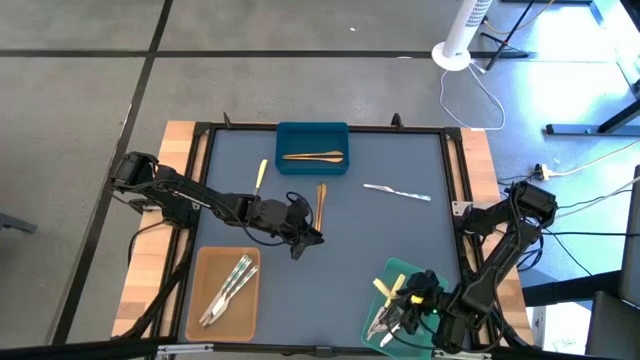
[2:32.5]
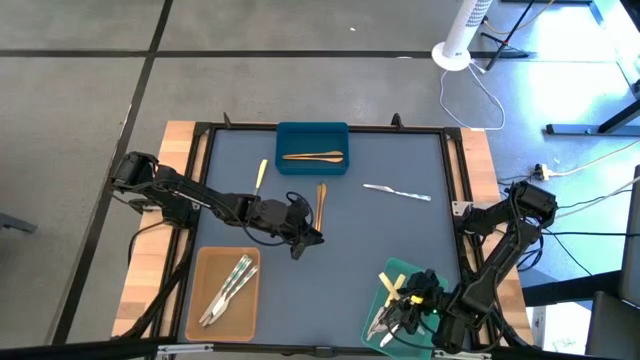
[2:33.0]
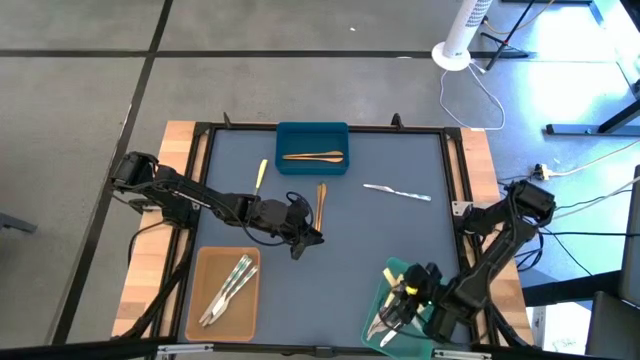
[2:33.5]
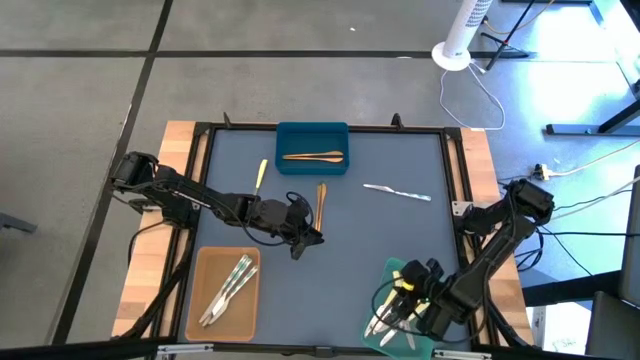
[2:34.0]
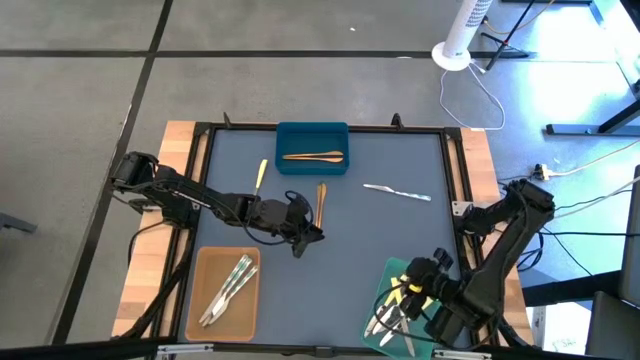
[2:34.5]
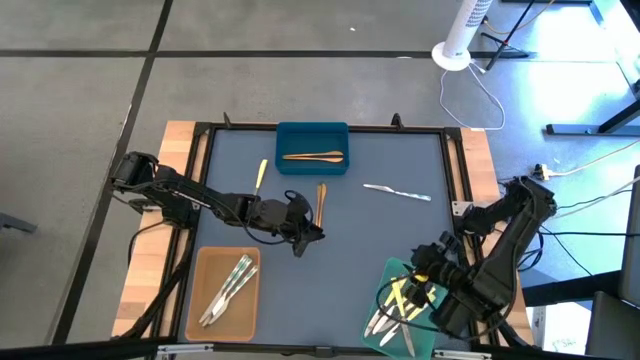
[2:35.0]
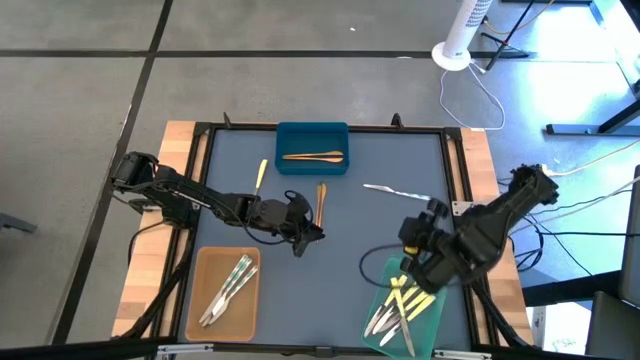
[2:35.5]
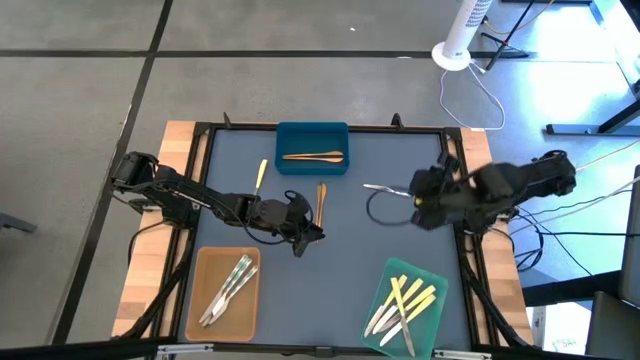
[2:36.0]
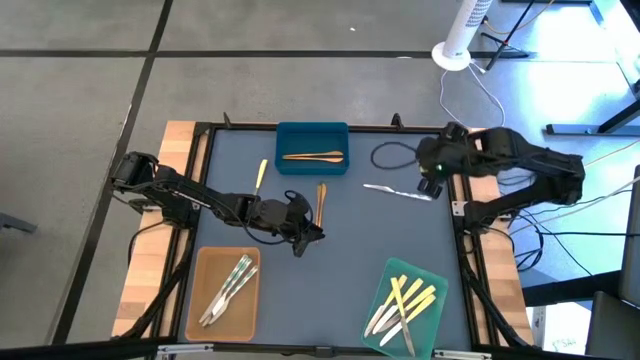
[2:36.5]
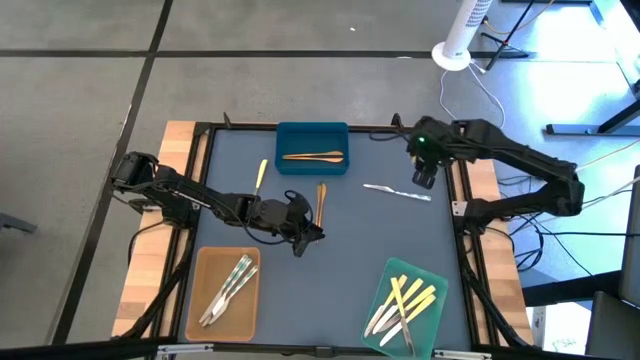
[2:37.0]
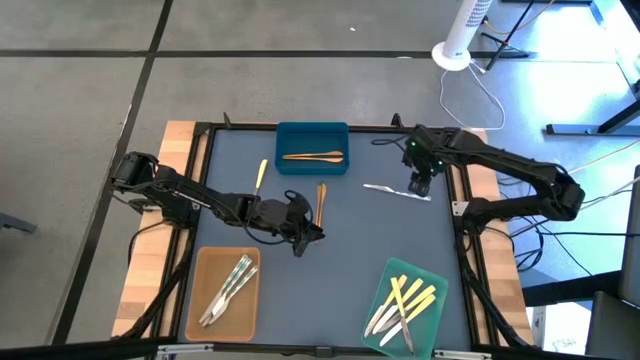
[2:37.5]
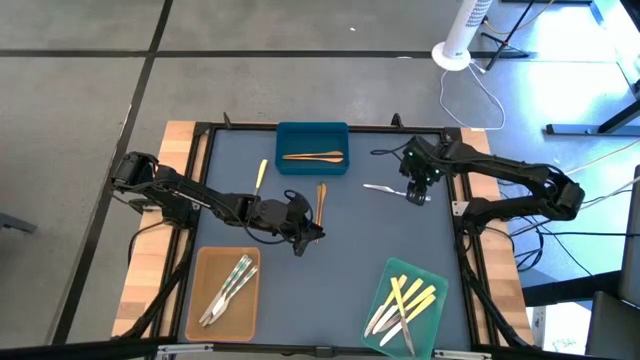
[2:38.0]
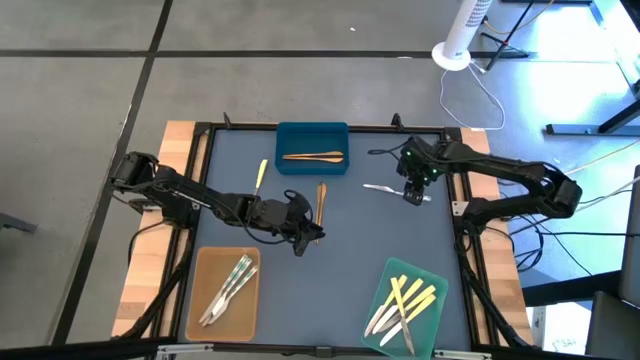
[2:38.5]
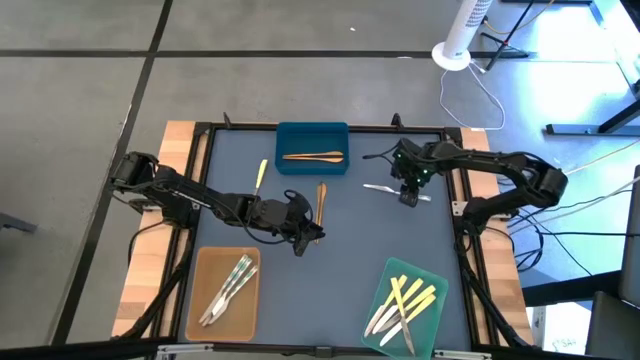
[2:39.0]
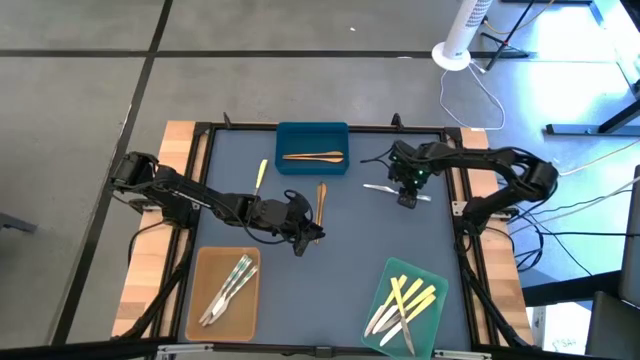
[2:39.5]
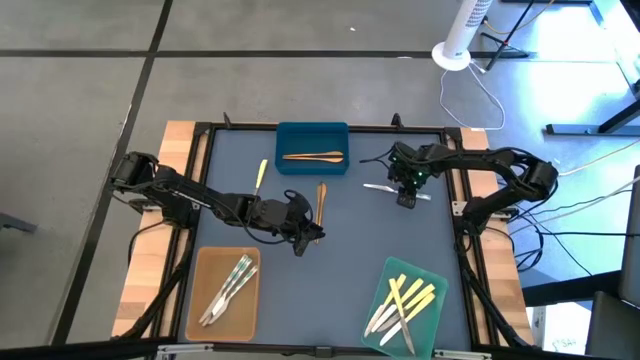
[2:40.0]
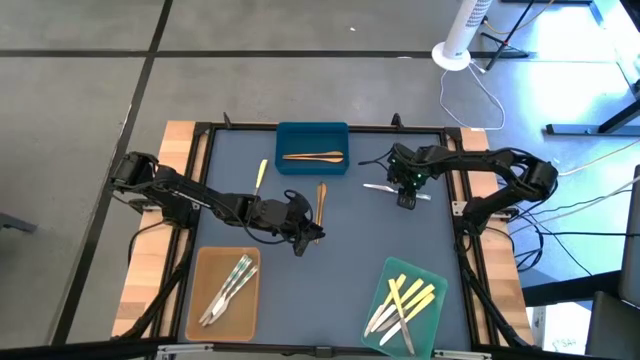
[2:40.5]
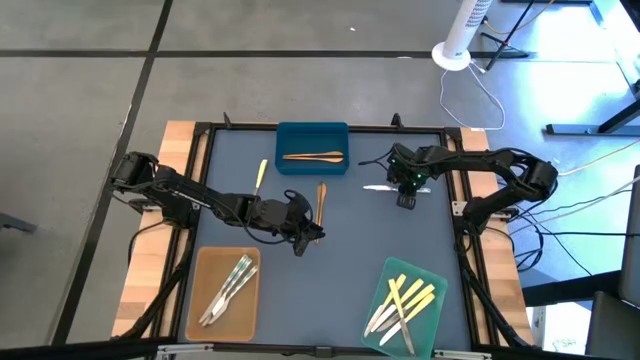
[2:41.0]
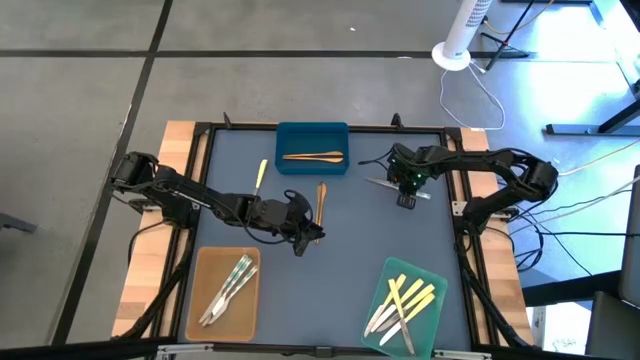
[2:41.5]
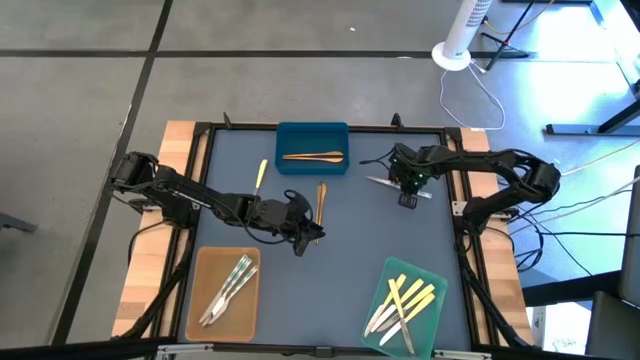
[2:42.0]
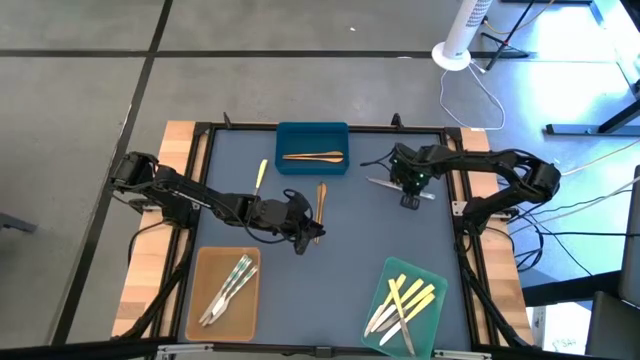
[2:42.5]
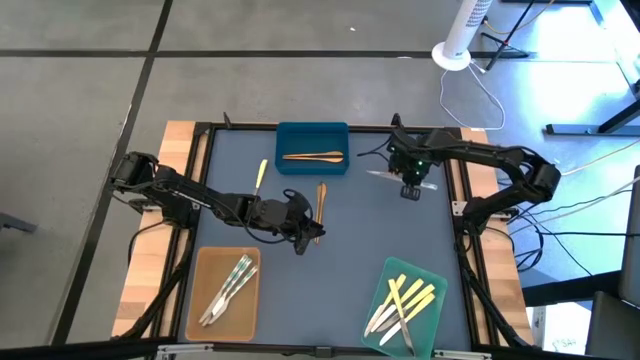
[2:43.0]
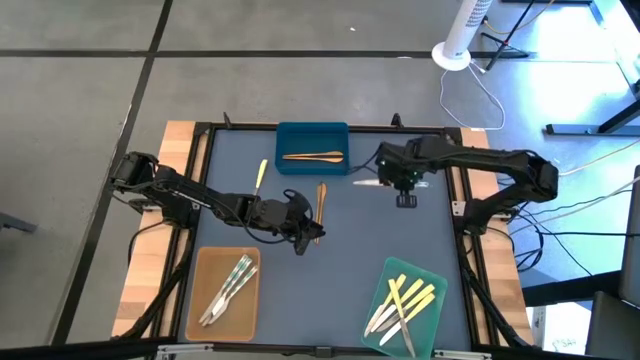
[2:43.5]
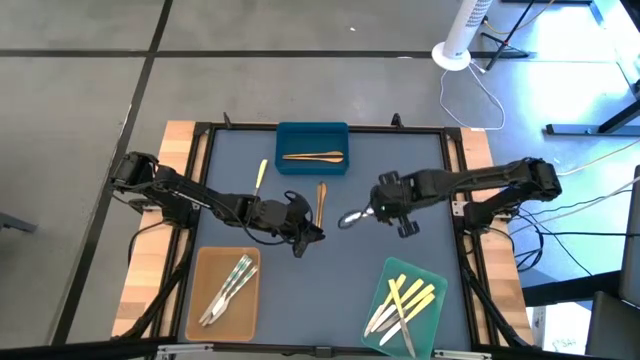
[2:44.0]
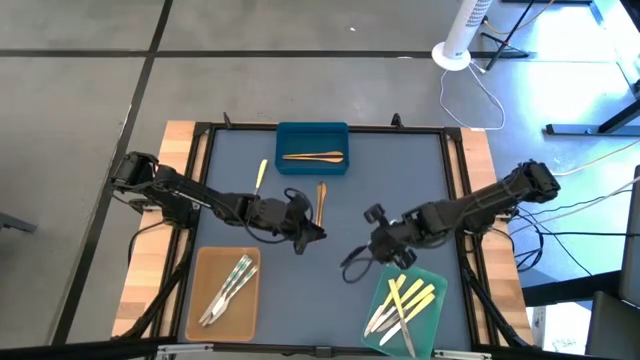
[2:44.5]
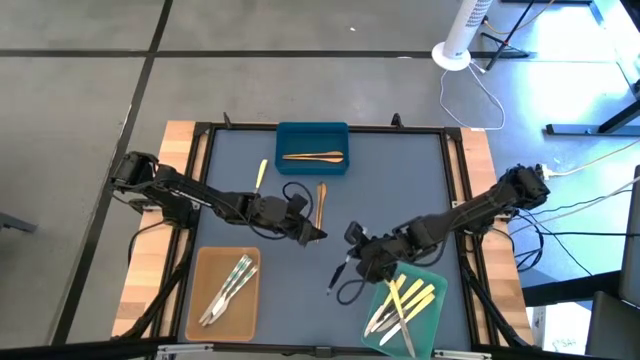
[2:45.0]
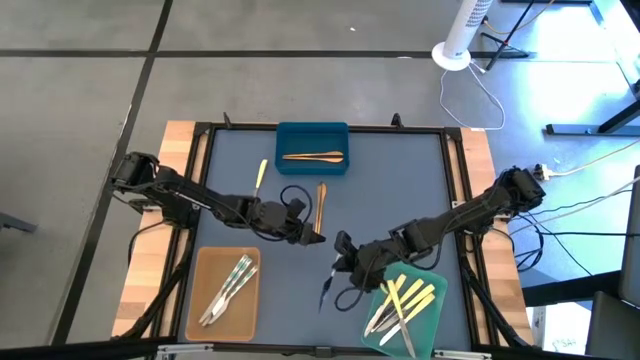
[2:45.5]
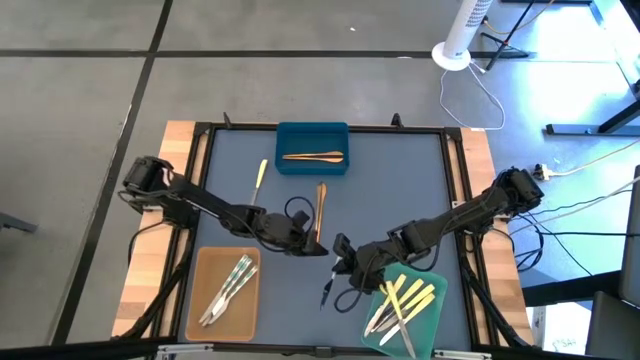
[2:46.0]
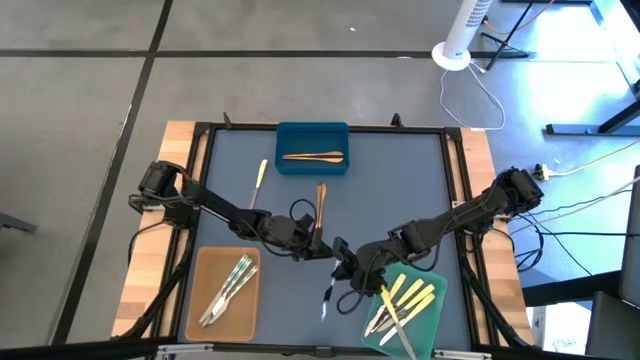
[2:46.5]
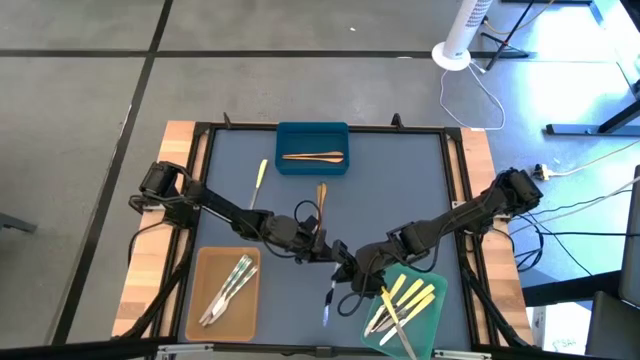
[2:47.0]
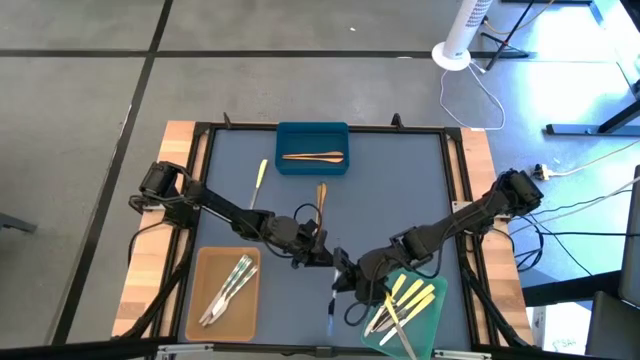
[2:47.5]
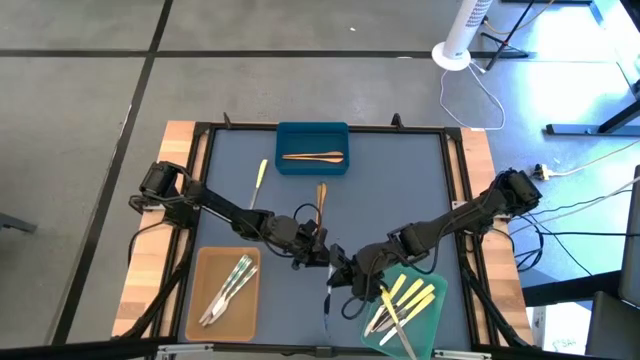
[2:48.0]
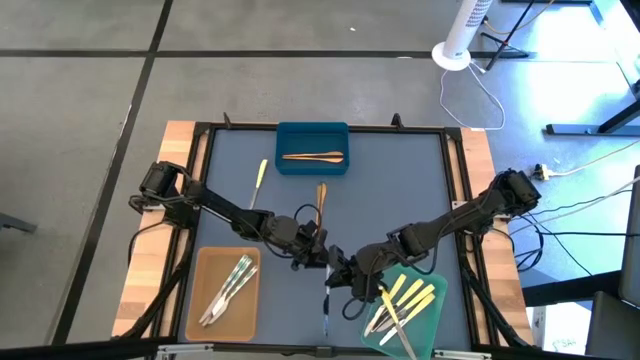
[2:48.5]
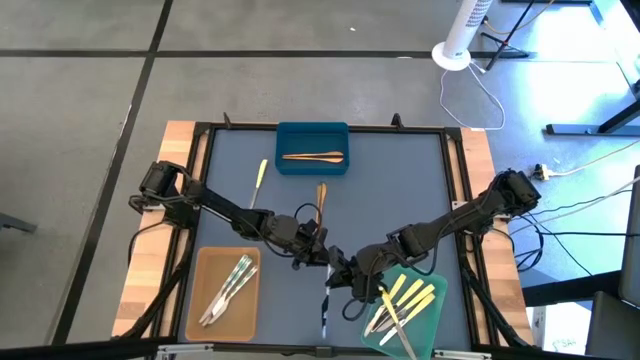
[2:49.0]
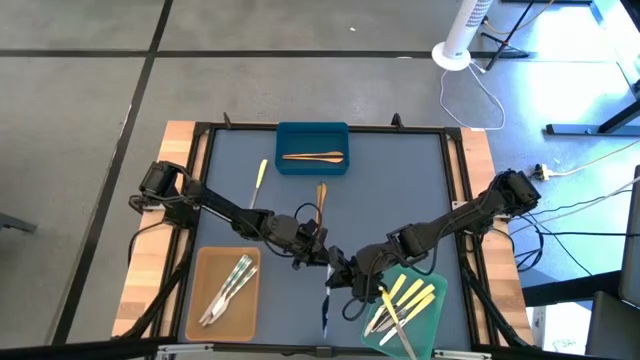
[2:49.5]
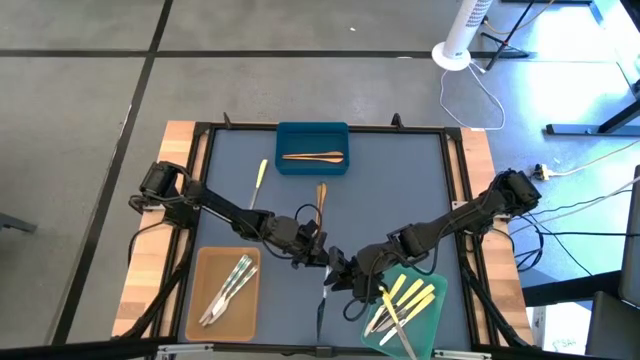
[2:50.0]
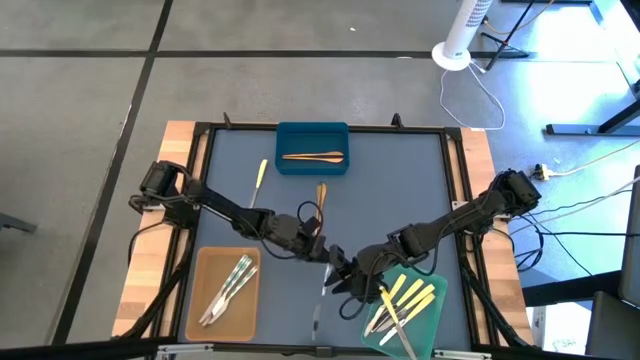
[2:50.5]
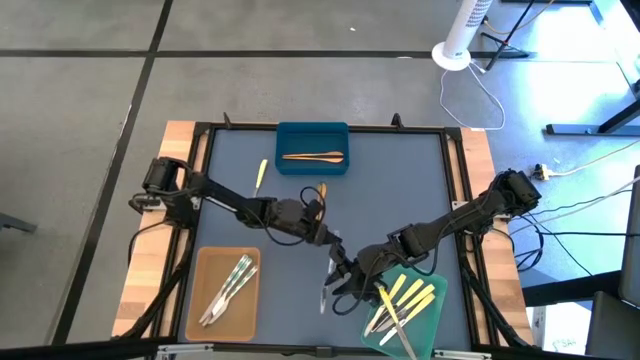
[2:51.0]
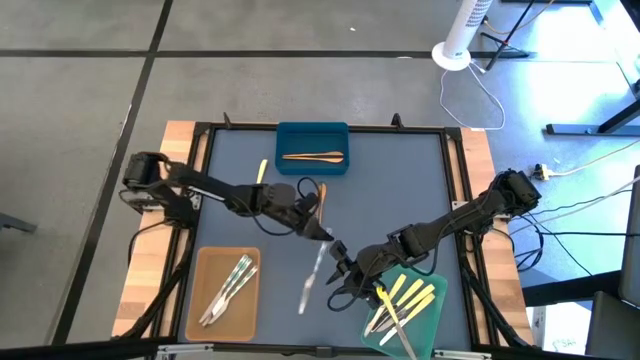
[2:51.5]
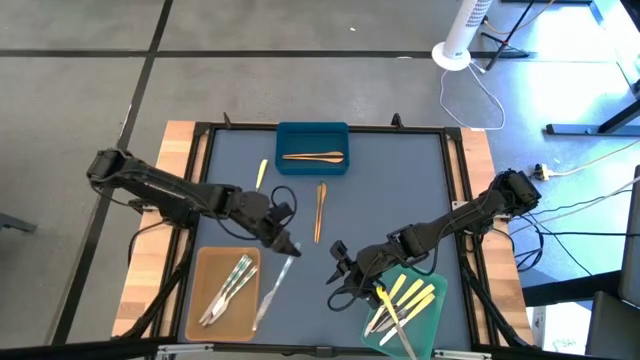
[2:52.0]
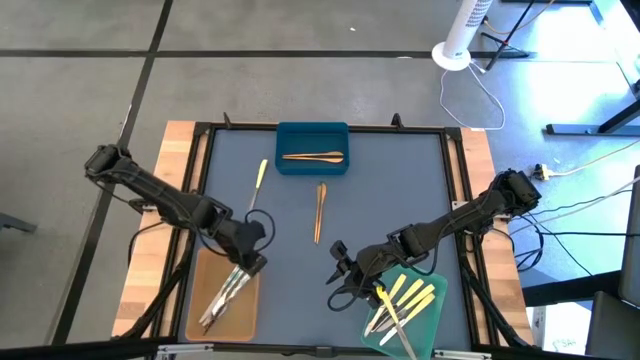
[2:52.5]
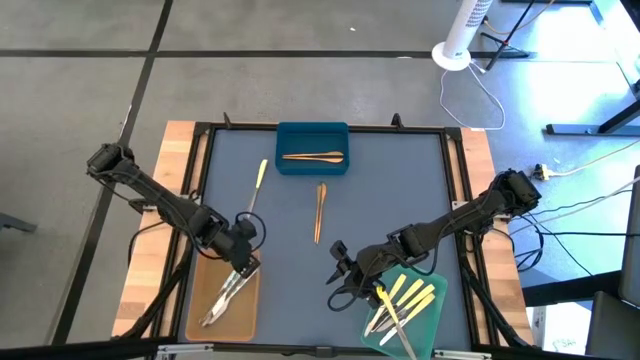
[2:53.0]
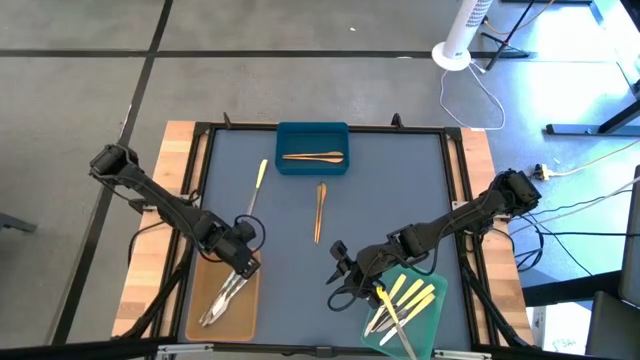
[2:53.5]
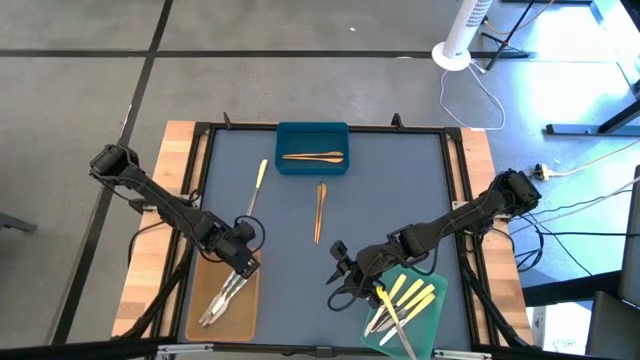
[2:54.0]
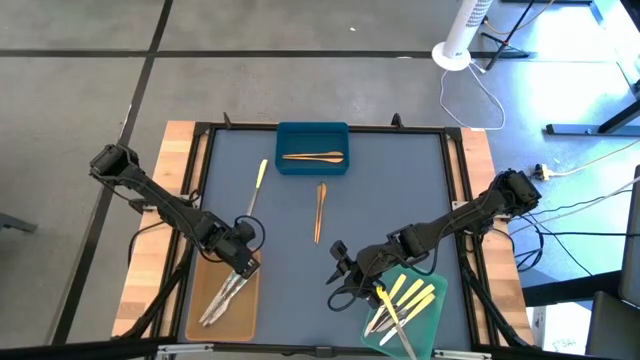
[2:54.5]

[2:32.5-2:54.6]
Task: Sort silverware by color (type)
Put the green patterned knife into the orange bin
